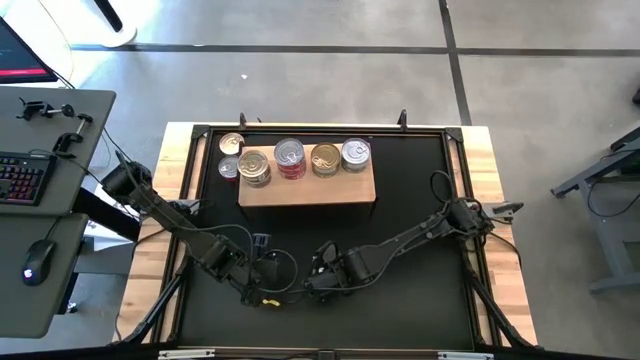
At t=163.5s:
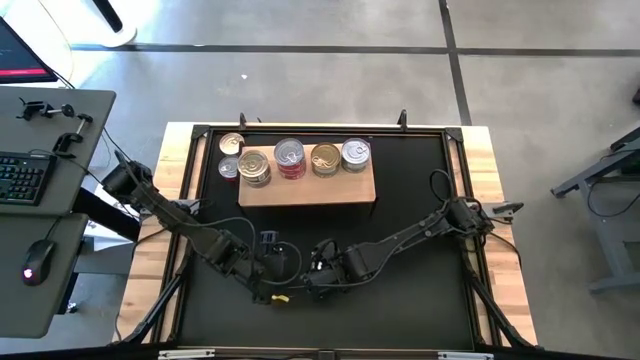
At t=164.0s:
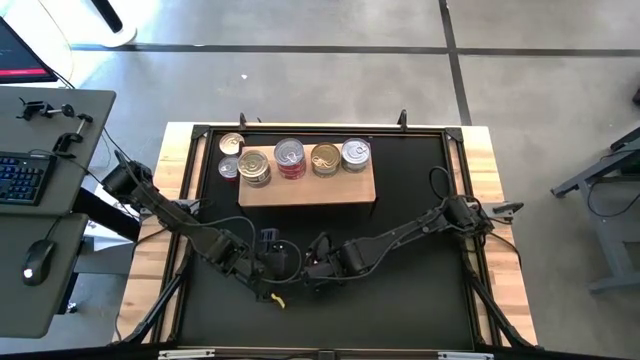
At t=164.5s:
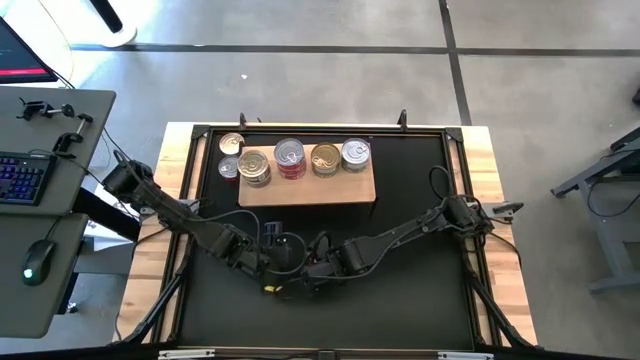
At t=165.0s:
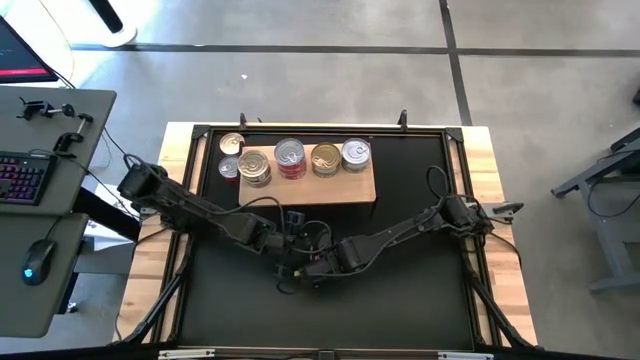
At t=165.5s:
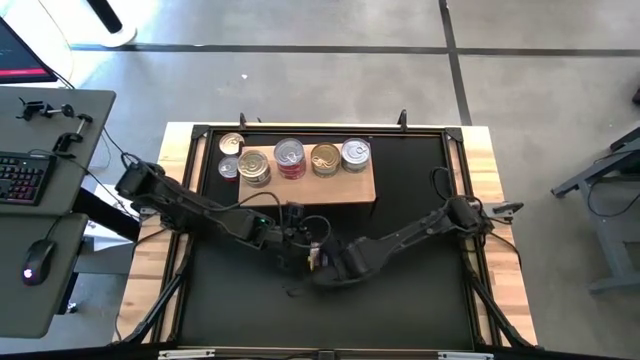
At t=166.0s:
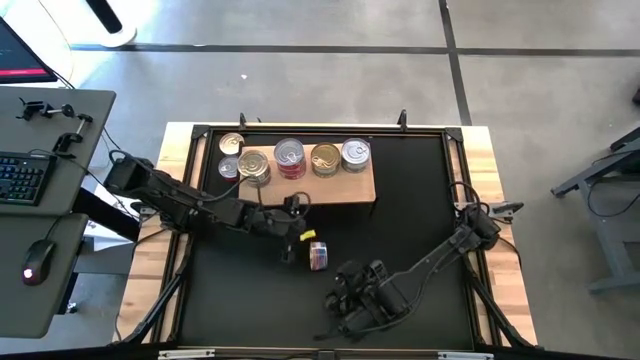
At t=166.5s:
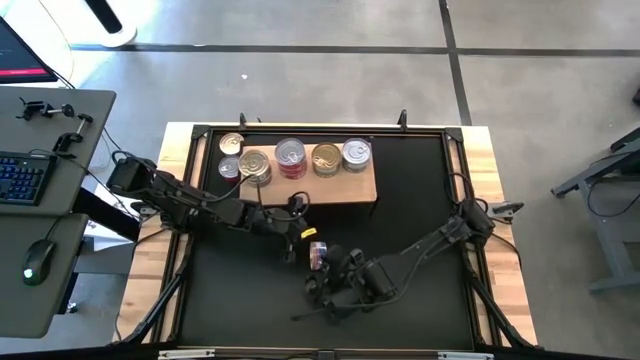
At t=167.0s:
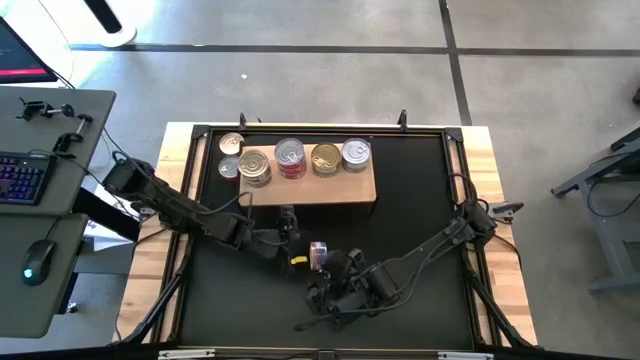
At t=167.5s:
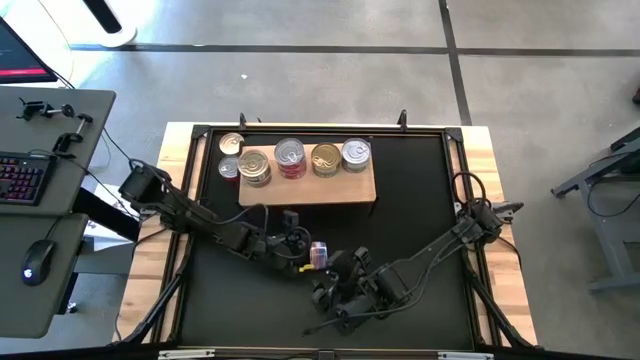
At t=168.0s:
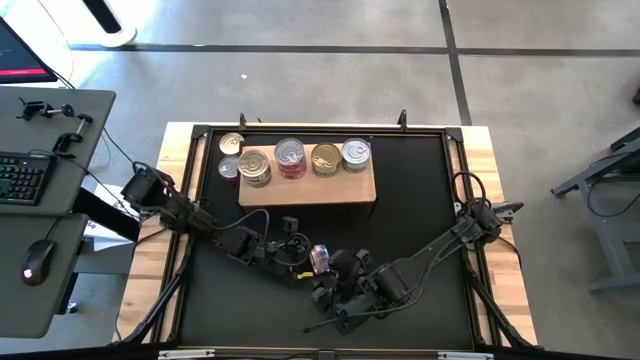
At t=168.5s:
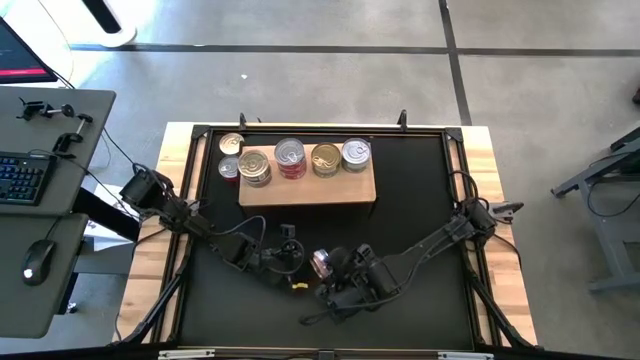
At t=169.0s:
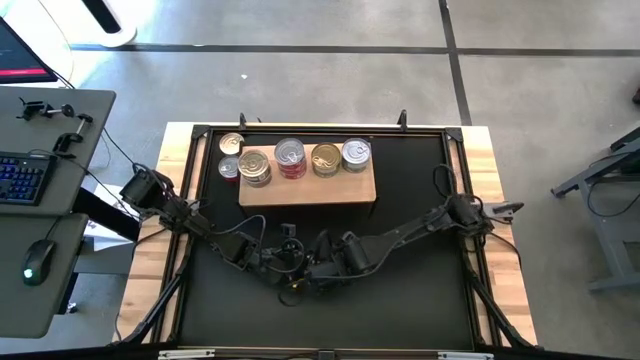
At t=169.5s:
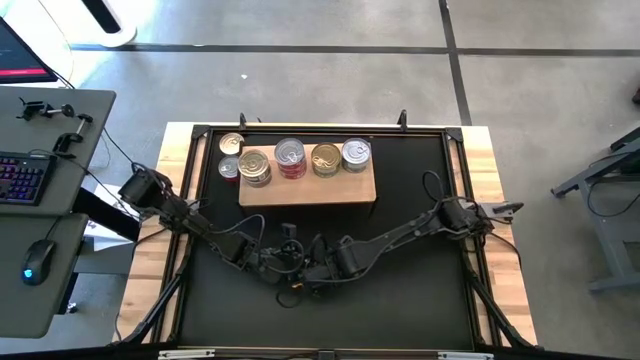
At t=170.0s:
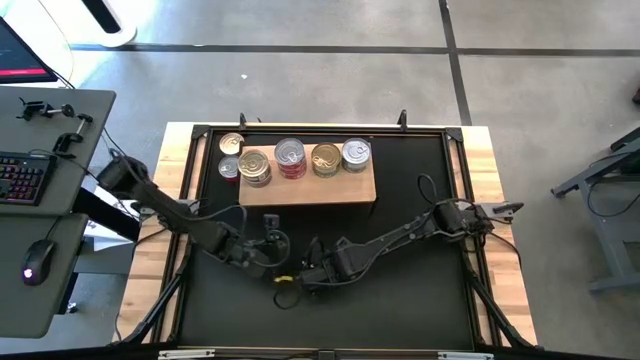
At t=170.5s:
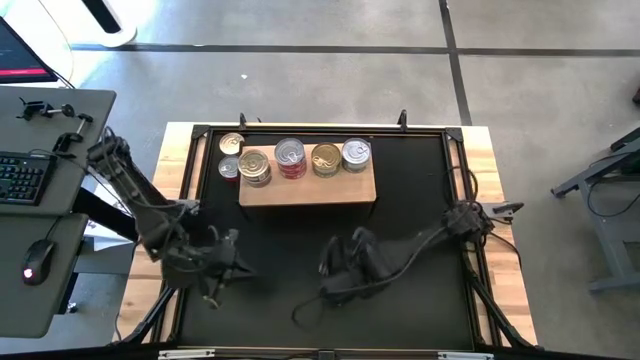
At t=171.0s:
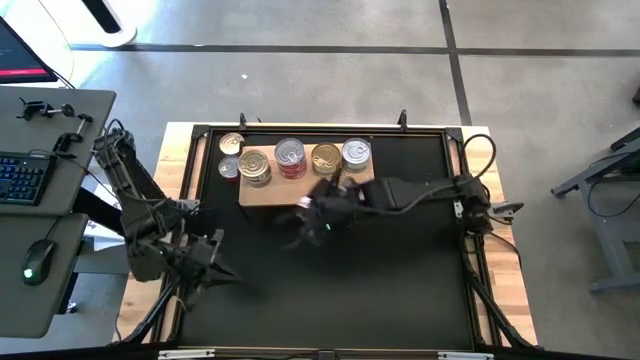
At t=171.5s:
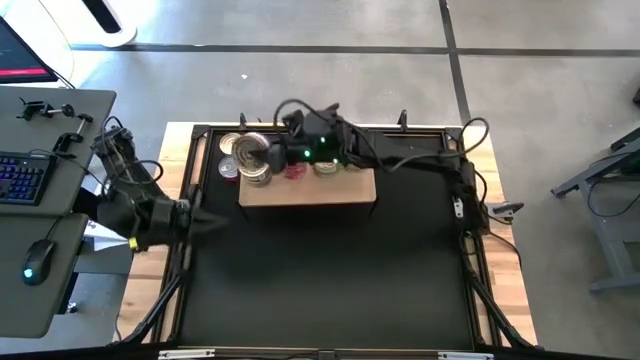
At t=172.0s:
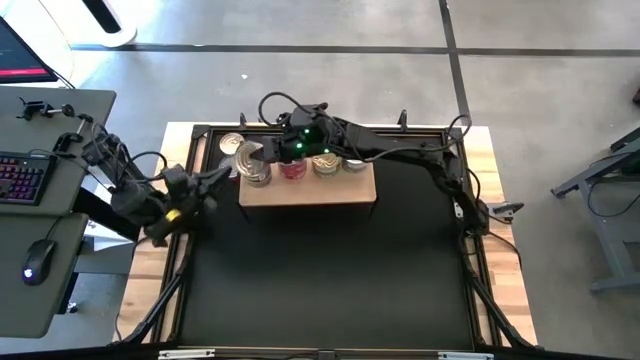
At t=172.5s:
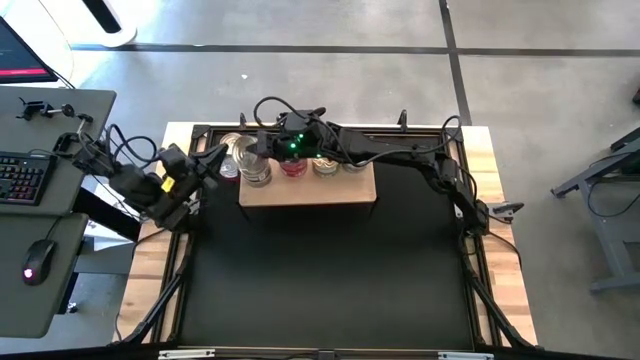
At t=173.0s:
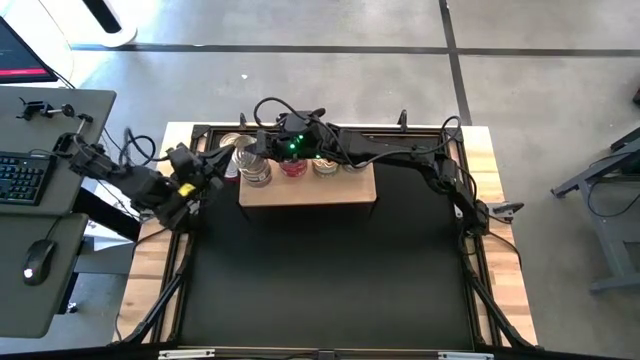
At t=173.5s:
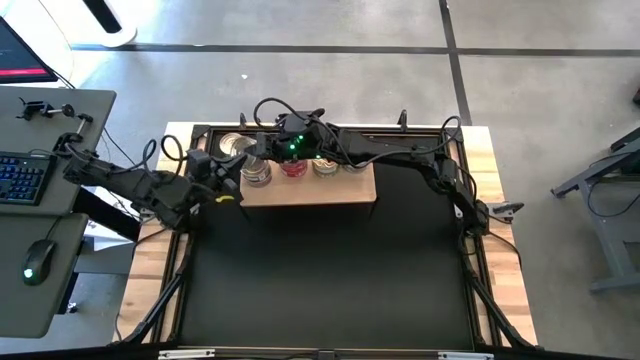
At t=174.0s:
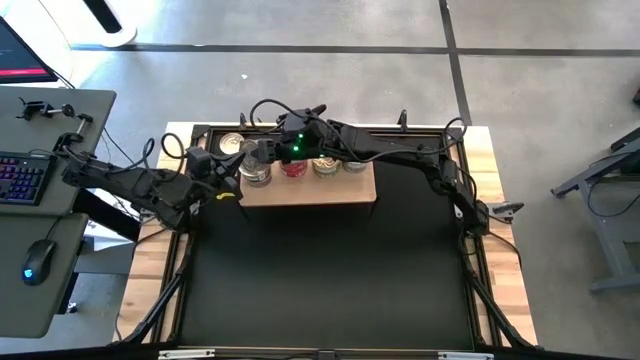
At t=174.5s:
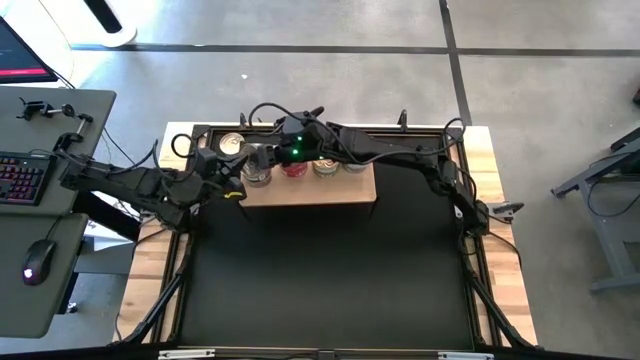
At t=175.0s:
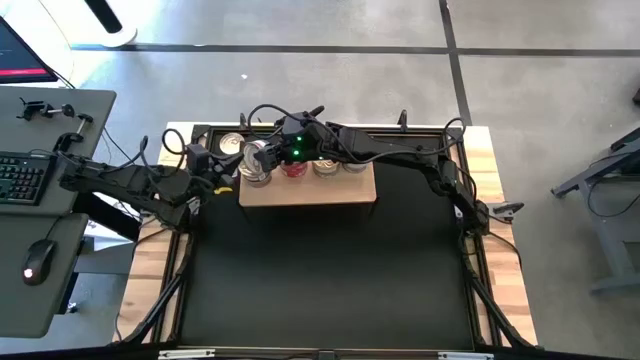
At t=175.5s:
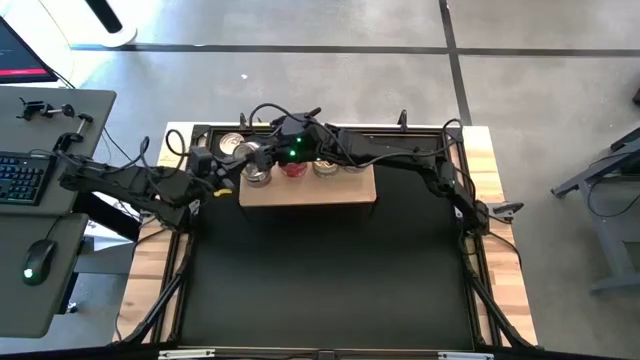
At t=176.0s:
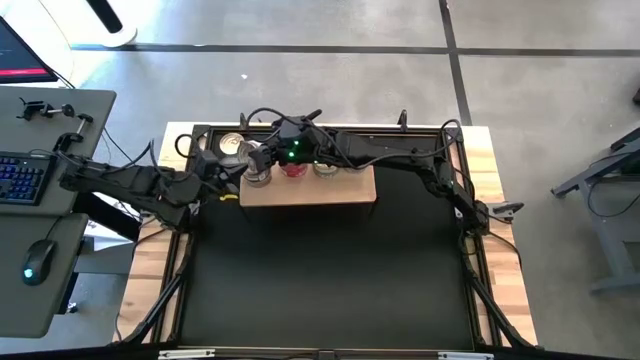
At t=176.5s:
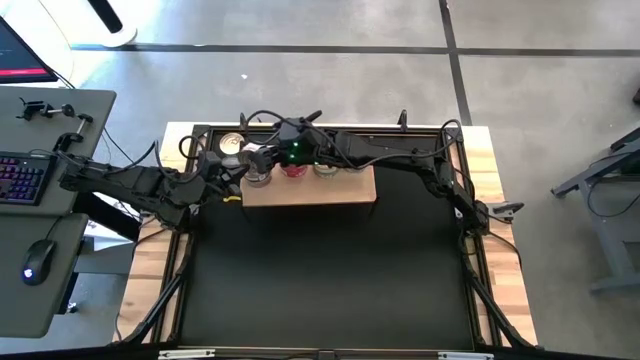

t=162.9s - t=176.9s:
Task: Stack canned seafood by type on shelf
Stack the right blue and red tuna can on top of the blue and red tuna cans on the shelf

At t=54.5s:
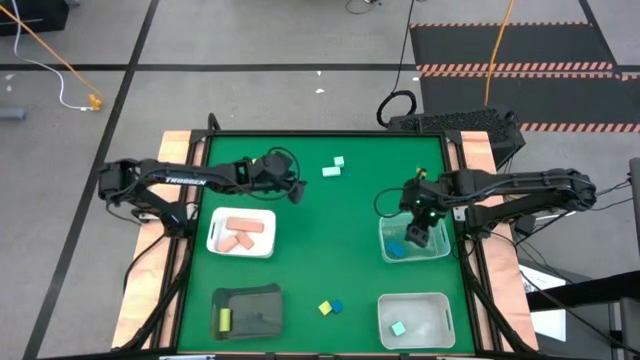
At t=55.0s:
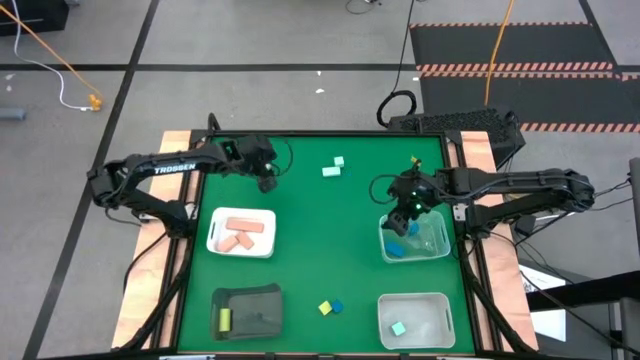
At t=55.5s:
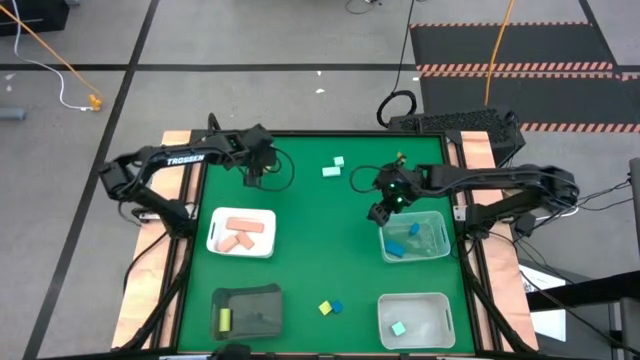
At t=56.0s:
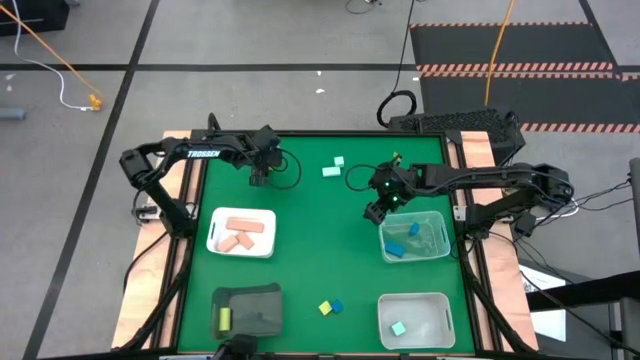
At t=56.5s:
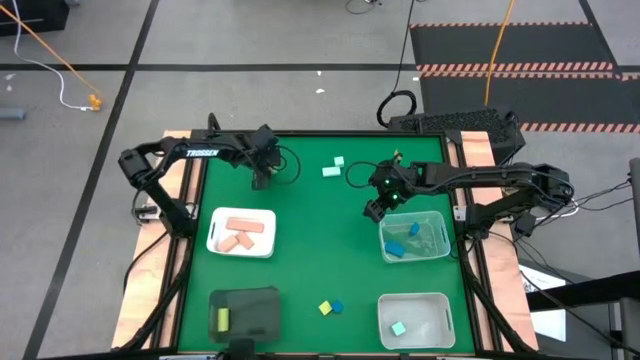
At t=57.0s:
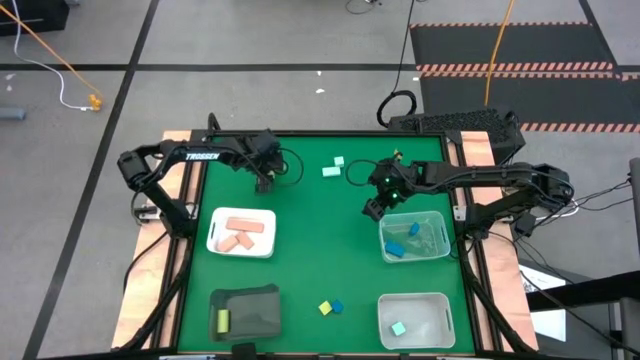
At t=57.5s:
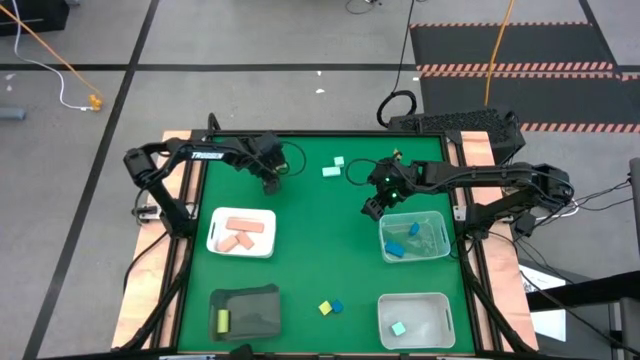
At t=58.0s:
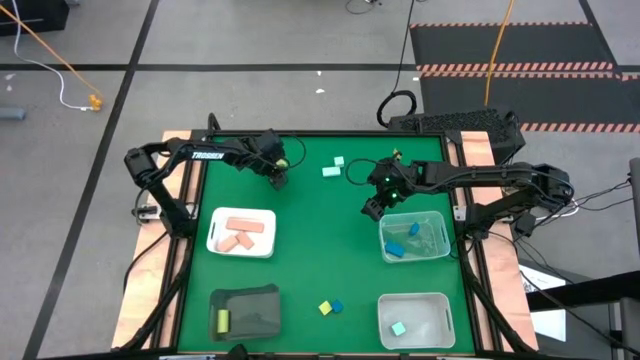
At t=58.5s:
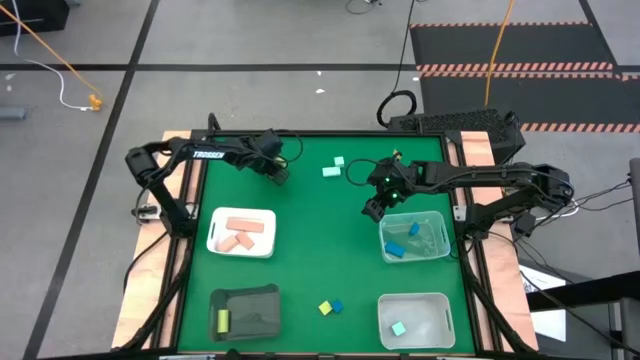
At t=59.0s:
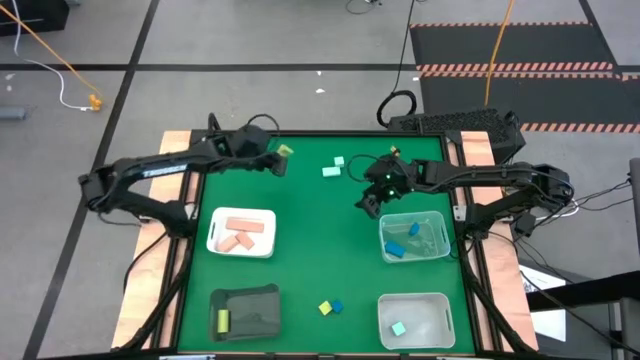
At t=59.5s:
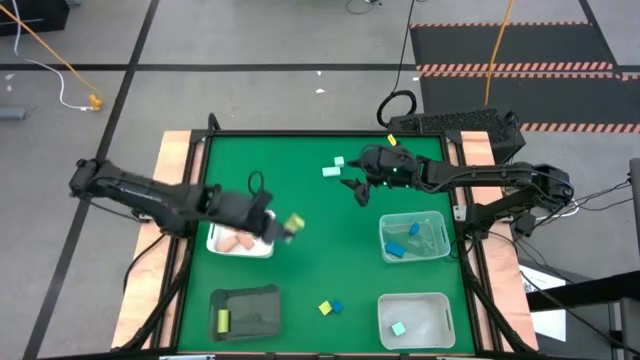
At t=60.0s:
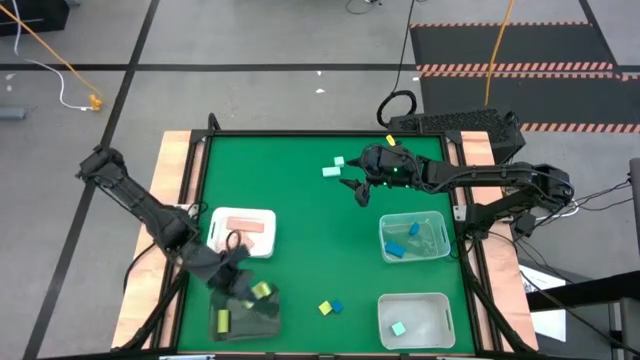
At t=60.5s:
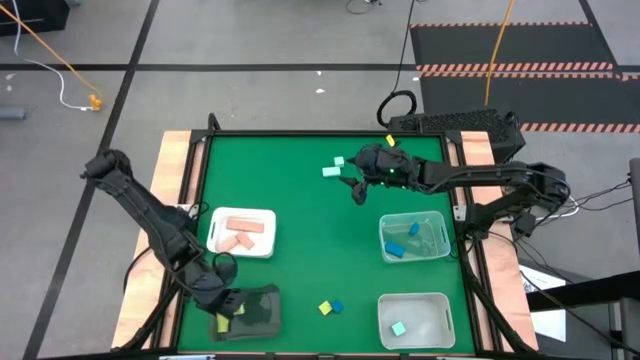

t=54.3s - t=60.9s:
Task: Sort & place blocks by color
Put the top green block into the black bin
